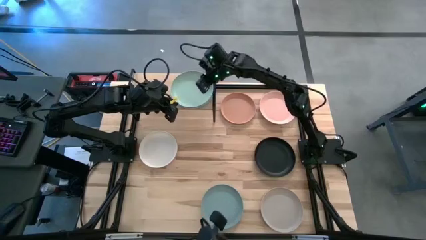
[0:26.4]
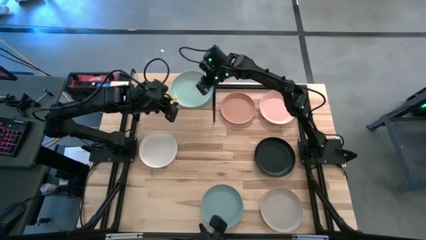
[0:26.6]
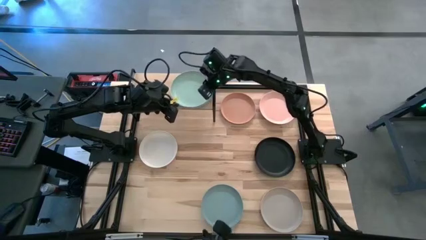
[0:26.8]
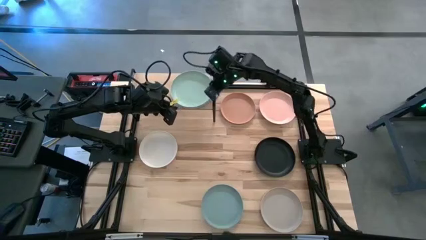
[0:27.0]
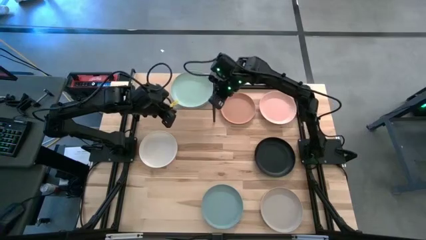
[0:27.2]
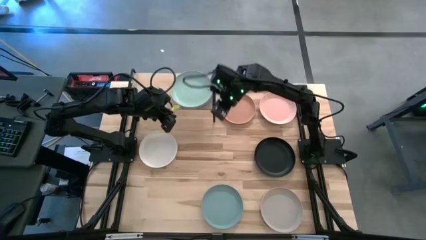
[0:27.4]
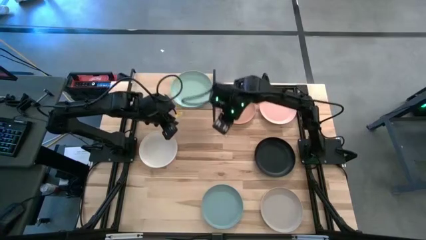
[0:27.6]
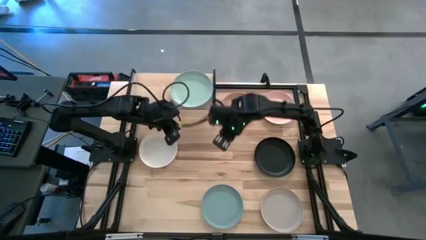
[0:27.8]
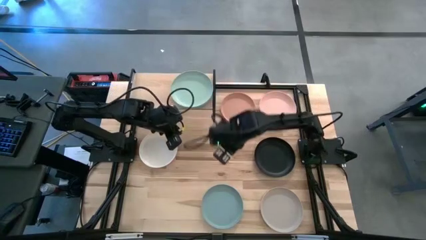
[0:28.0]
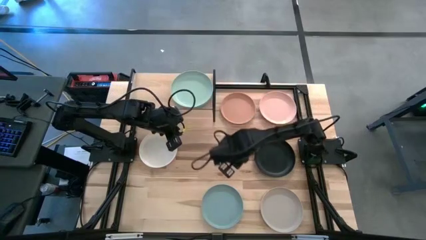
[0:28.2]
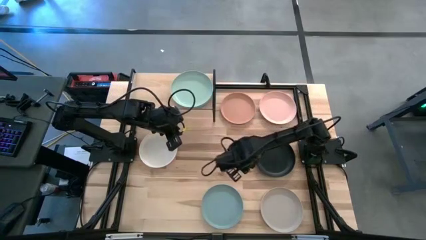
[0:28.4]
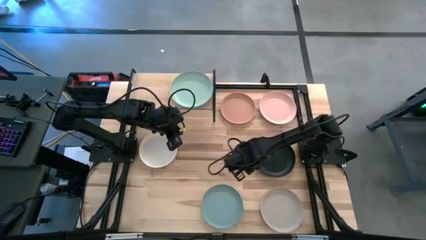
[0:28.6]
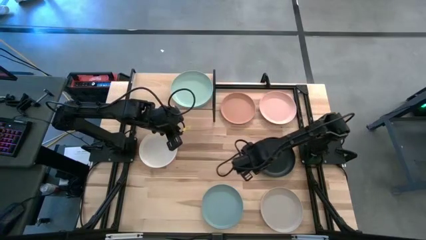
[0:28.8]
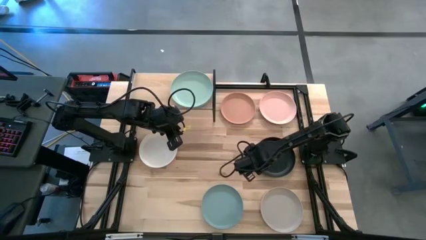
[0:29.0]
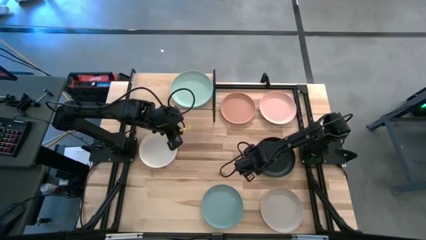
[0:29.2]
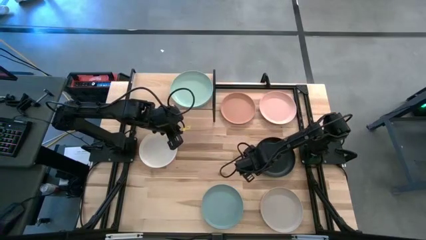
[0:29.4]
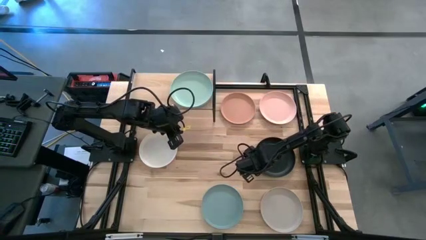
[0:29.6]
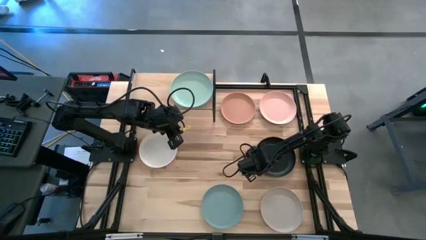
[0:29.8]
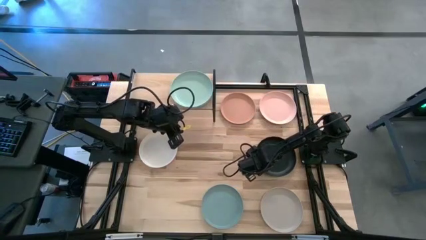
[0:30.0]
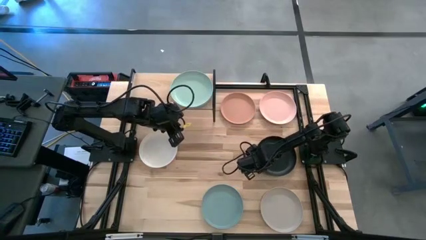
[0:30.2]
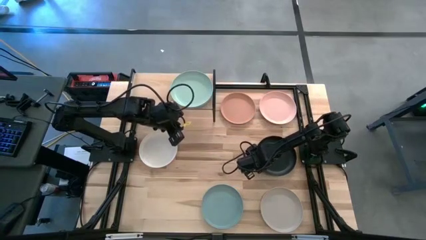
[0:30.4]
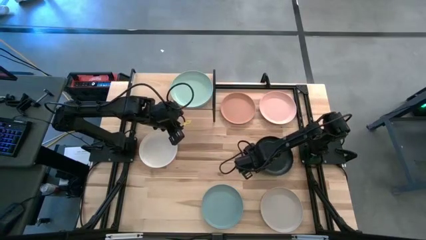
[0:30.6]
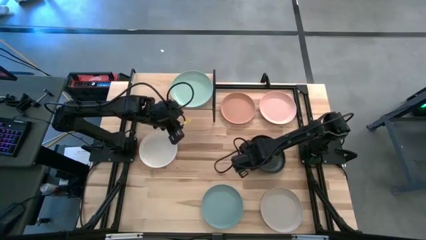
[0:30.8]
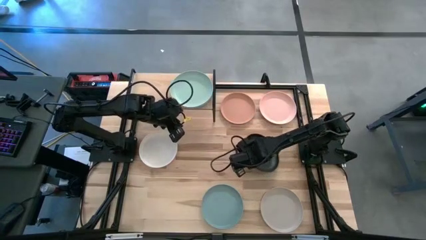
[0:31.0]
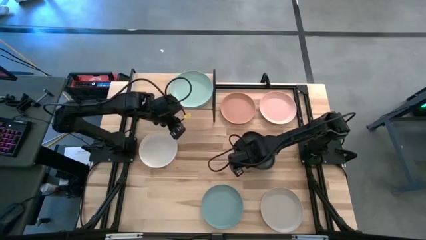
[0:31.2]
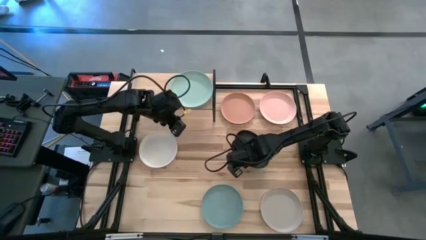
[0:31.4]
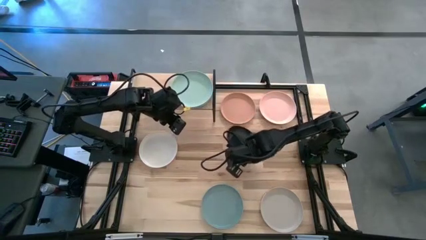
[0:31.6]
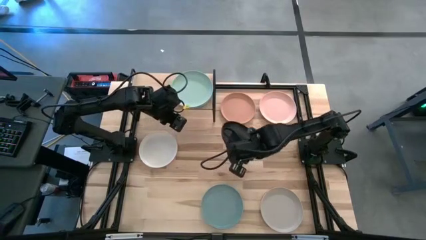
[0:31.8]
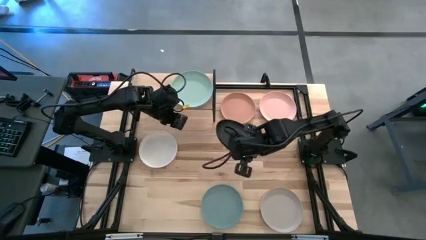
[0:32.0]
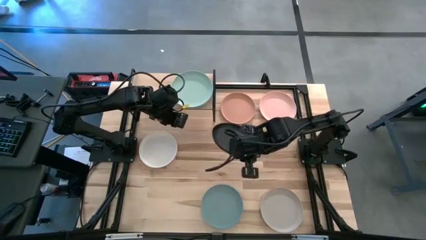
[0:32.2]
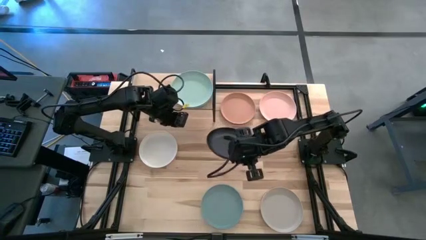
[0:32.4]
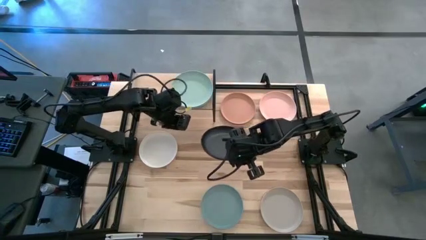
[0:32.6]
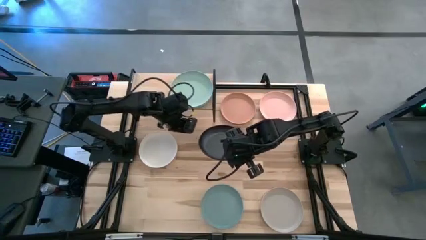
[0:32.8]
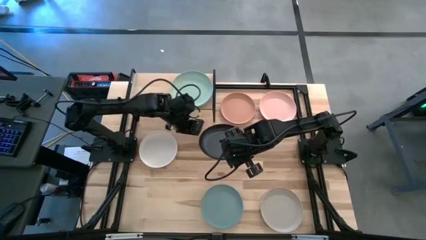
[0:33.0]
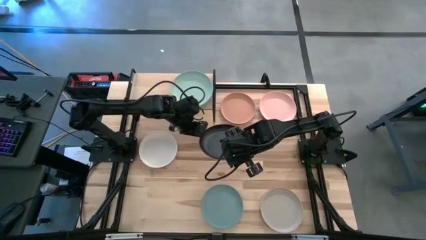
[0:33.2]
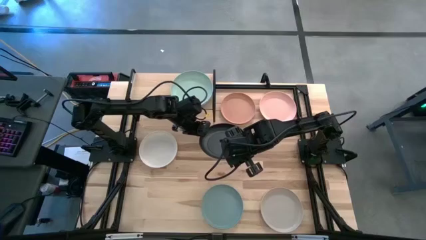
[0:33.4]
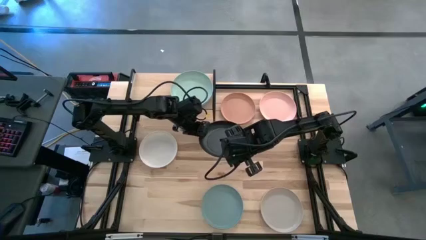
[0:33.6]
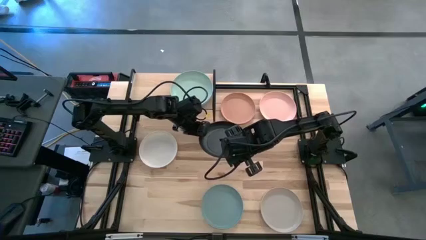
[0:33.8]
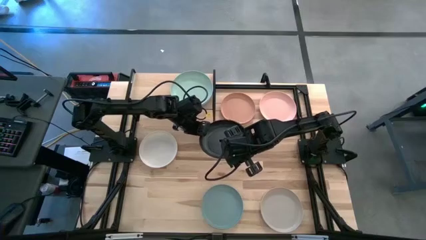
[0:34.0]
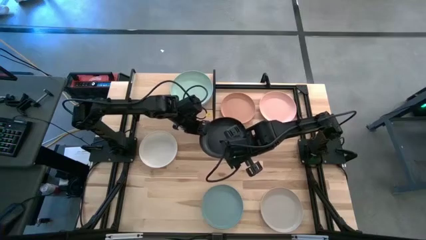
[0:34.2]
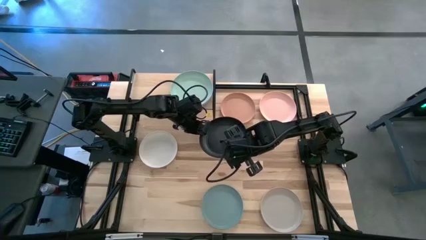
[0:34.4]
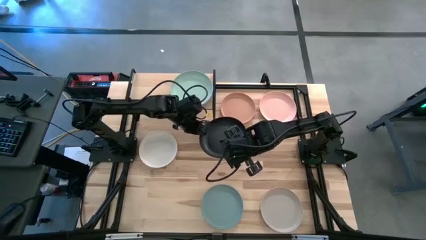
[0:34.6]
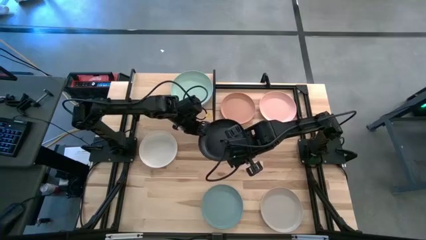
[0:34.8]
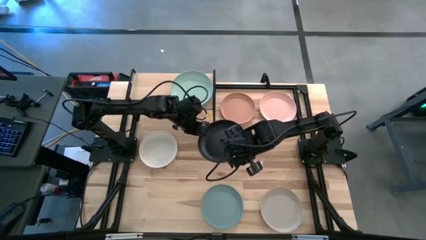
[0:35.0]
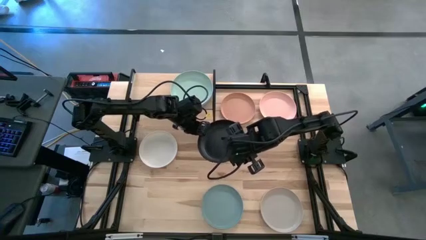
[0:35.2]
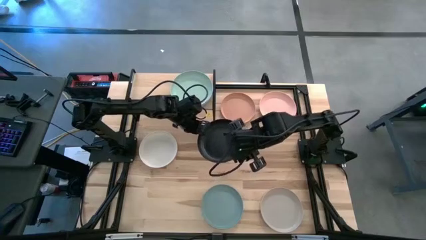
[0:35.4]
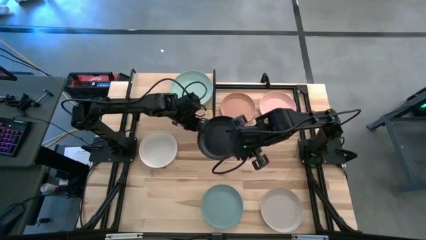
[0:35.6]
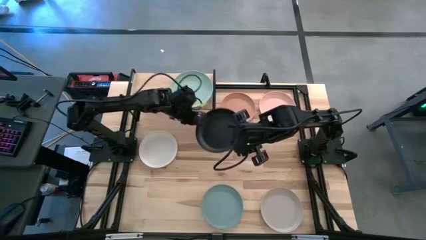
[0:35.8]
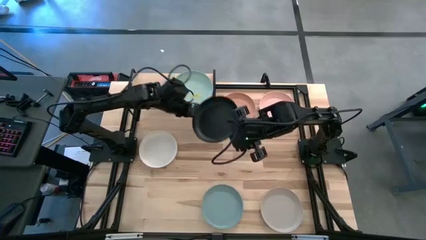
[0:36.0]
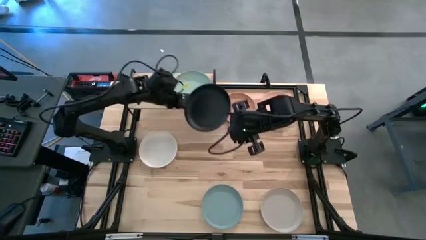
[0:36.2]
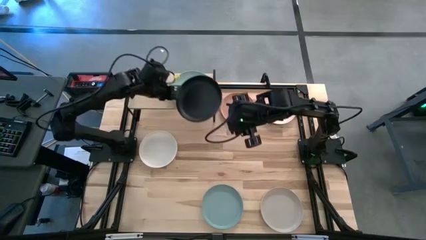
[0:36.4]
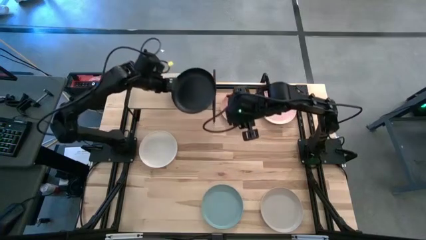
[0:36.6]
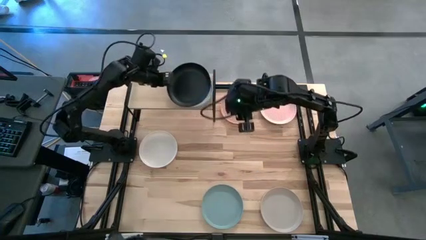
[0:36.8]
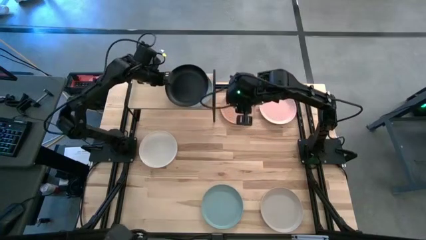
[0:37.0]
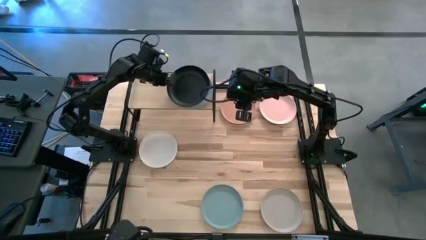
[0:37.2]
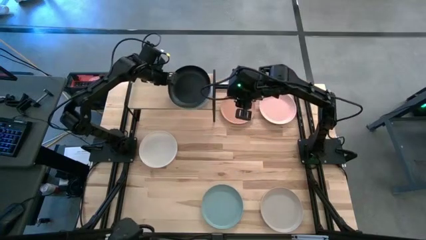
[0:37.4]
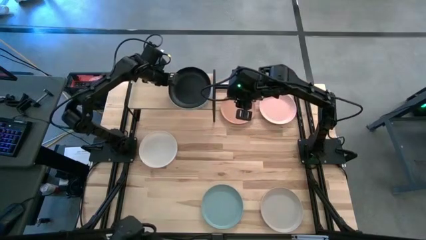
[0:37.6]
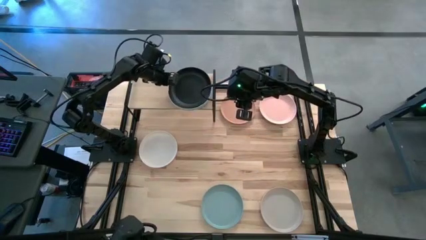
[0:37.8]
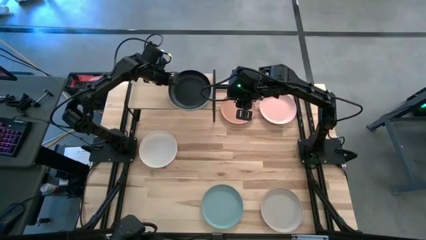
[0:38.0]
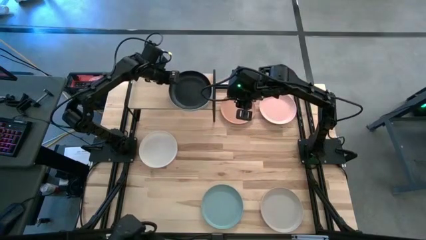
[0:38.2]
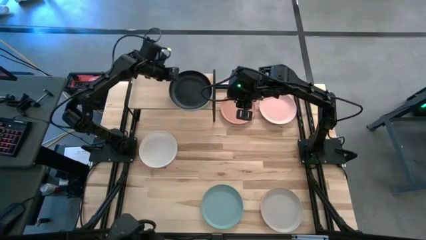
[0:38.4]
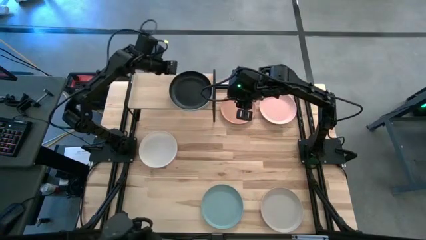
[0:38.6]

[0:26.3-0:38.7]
Task: Place and stack plates onto a shelf
Stack the black plate on top of the green plate on the shelf

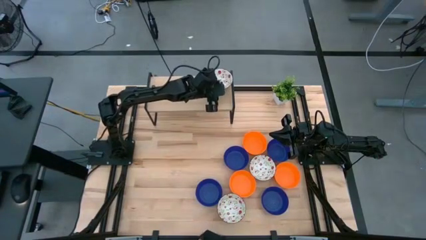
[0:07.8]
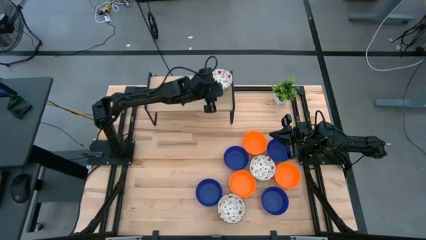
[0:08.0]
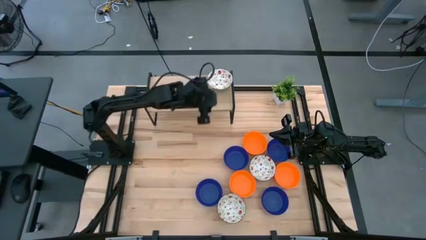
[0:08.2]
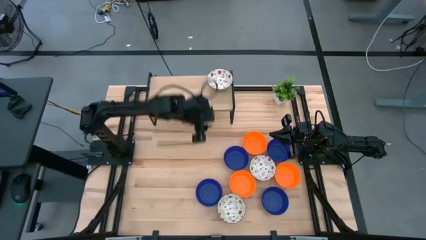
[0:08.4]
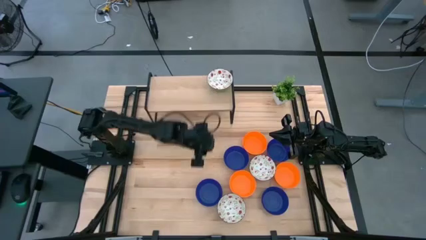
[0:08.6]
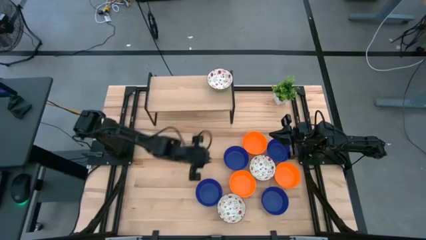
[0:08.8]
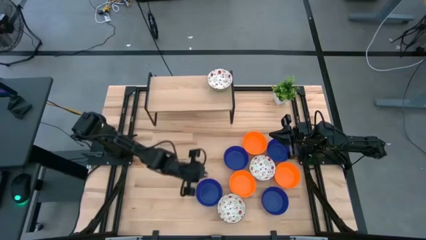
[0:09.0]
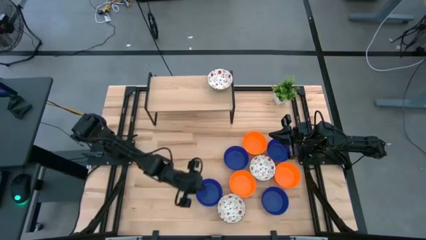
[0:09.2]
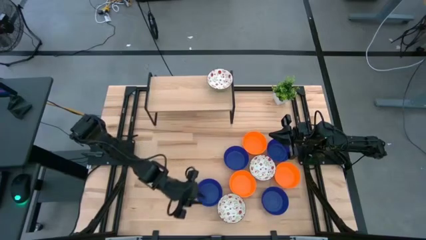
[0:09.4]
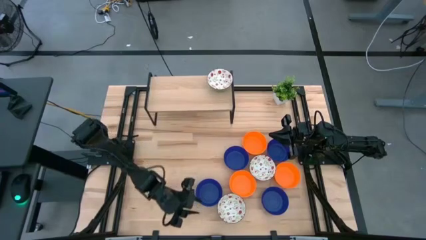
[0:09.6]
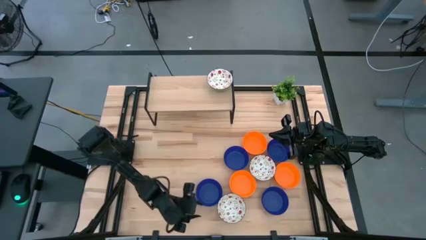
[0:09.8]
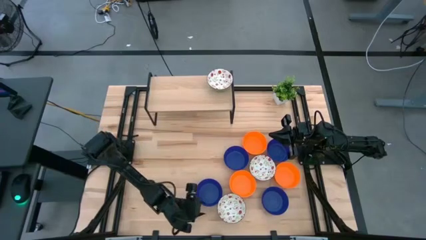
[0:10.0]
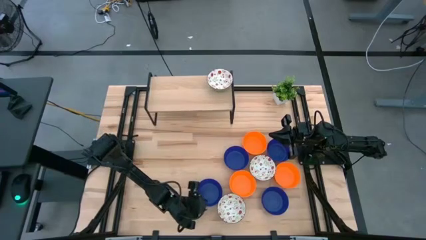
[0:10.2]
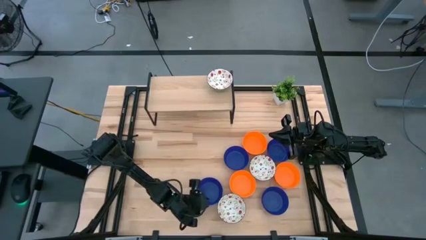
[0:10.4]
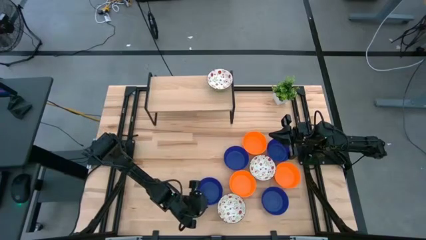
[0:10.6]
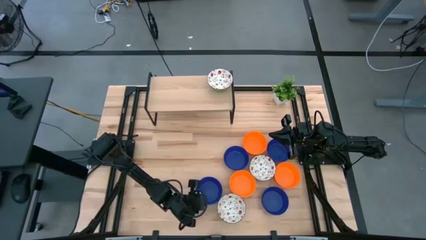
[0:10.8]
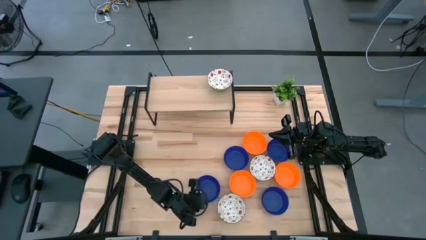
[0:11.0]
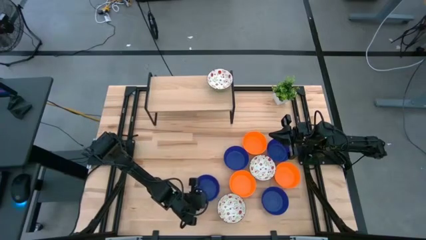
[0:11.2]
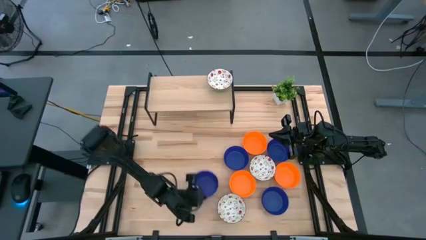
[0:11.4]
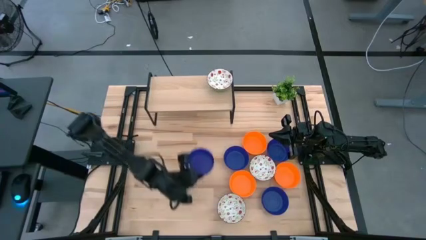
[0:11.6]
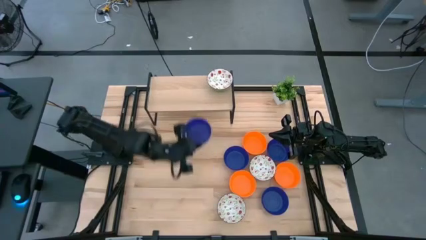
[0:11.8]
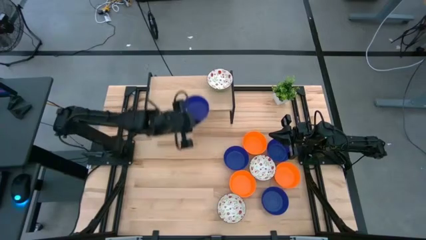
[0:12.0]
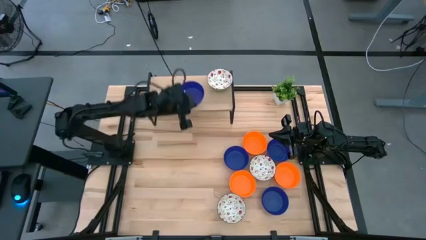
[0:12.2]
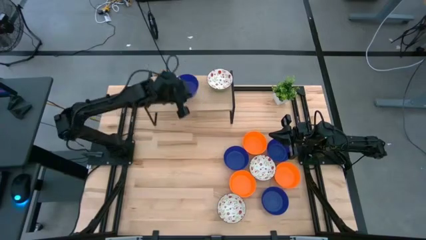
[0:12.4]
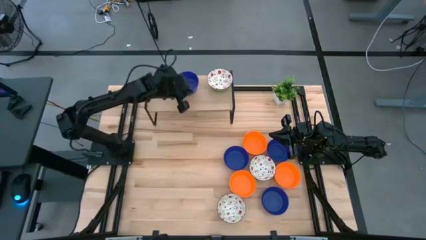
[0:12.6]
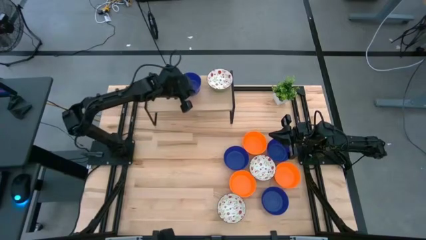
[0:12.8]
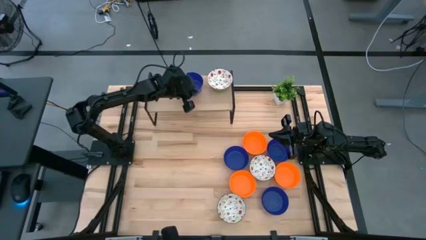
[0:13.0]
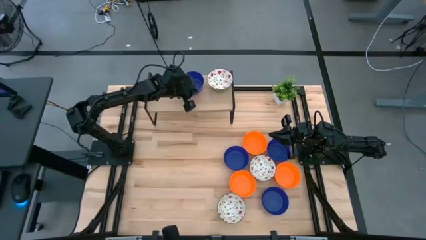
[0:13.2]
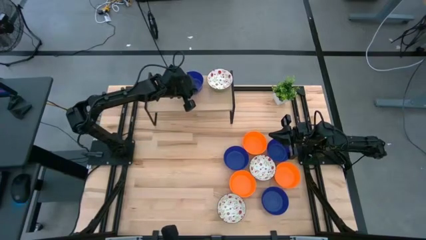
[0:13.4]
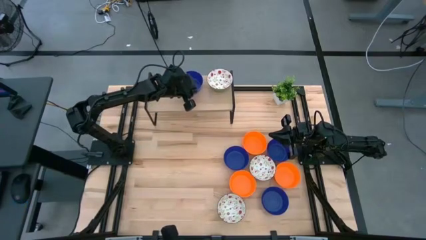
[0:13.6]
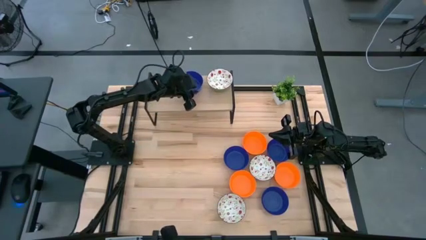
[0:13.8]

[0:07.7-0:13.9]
Task: Pick & Place Mini bowls
Put the blue bowl on the shelf
